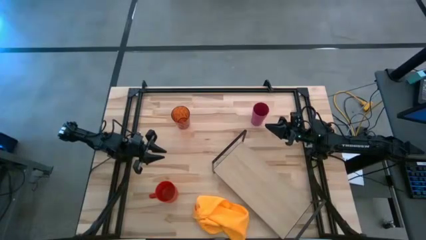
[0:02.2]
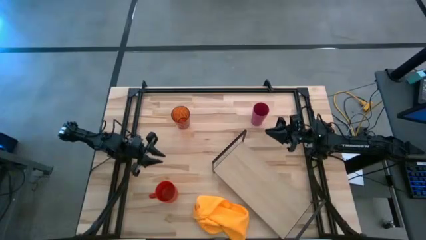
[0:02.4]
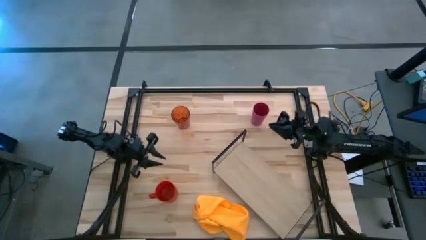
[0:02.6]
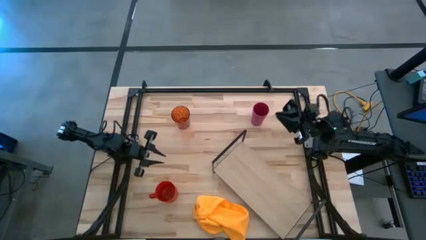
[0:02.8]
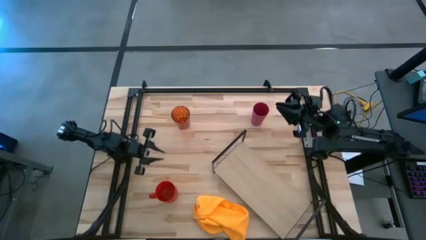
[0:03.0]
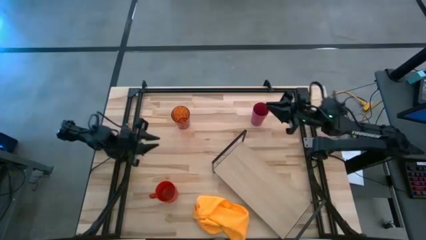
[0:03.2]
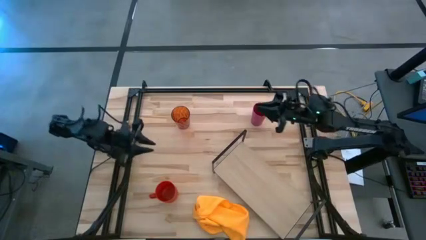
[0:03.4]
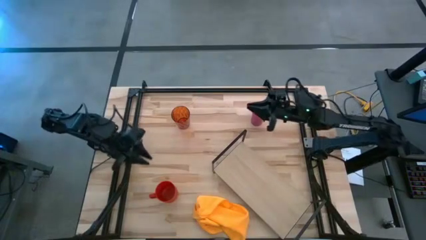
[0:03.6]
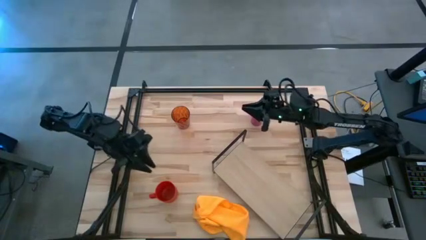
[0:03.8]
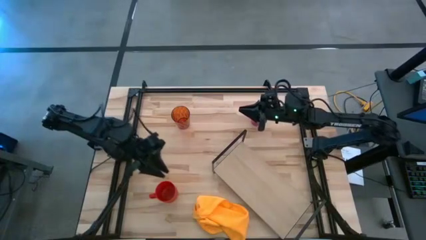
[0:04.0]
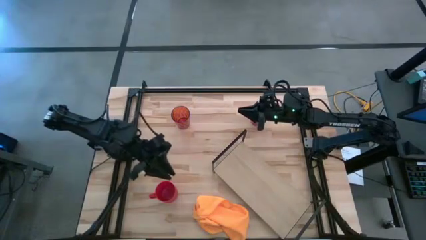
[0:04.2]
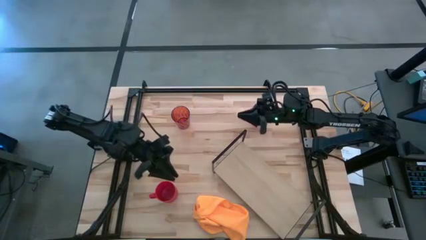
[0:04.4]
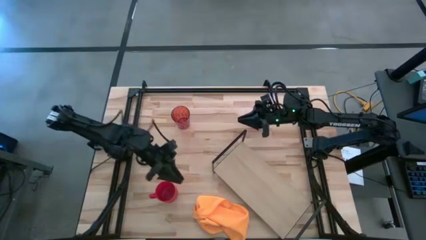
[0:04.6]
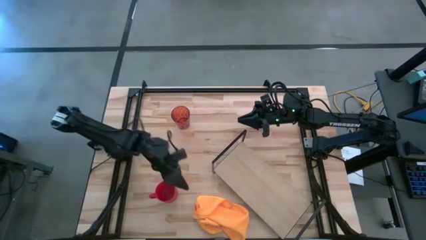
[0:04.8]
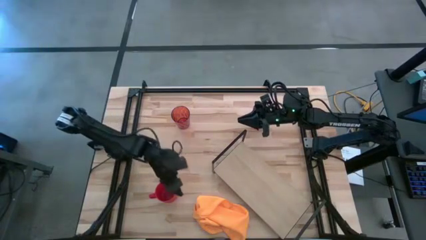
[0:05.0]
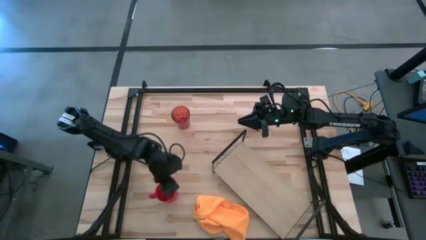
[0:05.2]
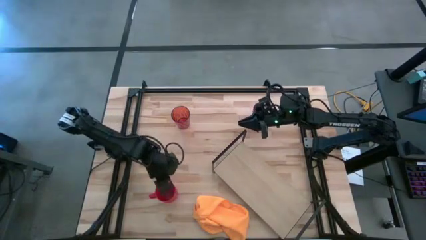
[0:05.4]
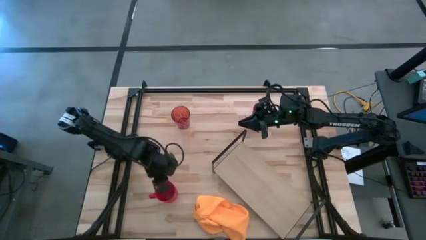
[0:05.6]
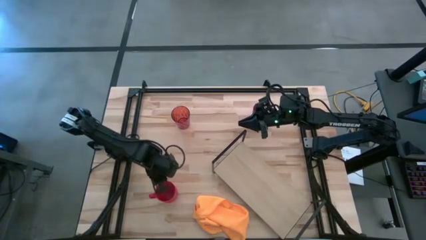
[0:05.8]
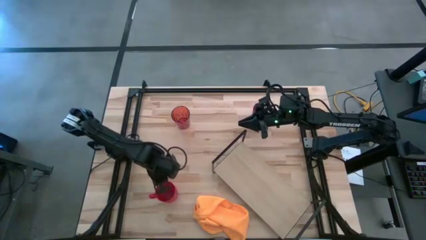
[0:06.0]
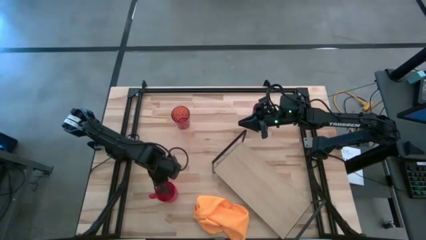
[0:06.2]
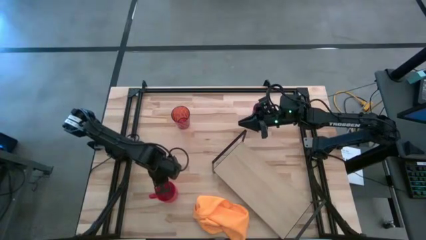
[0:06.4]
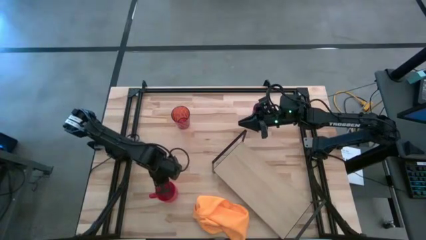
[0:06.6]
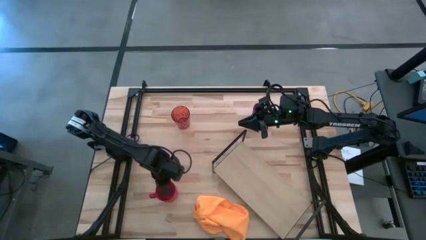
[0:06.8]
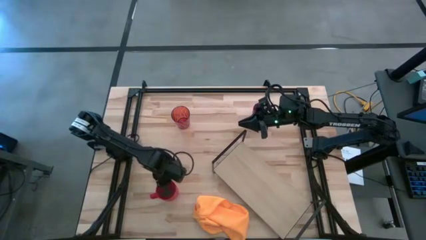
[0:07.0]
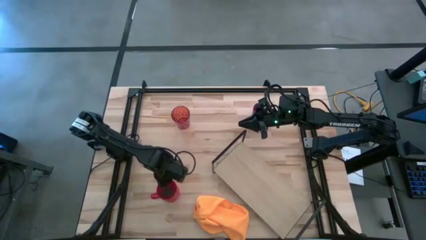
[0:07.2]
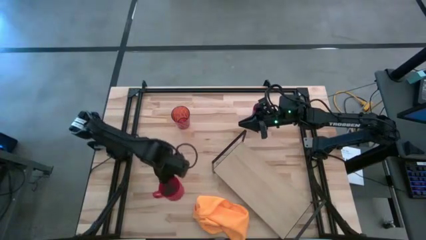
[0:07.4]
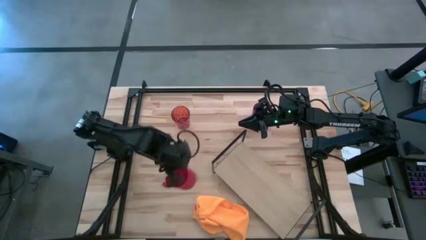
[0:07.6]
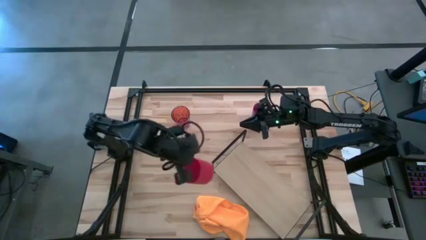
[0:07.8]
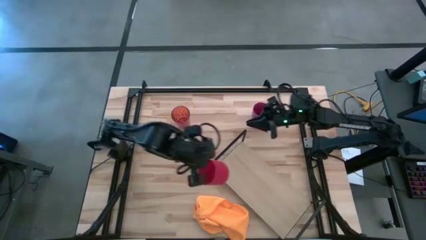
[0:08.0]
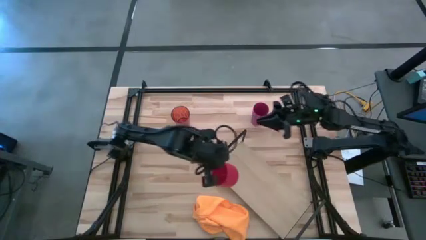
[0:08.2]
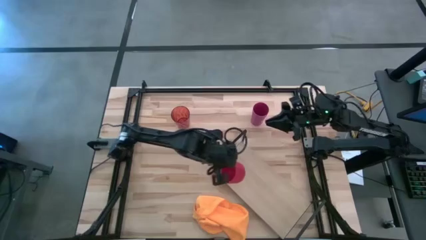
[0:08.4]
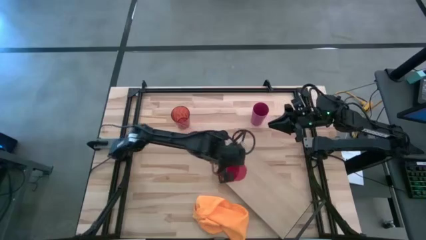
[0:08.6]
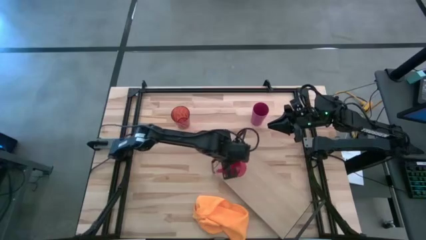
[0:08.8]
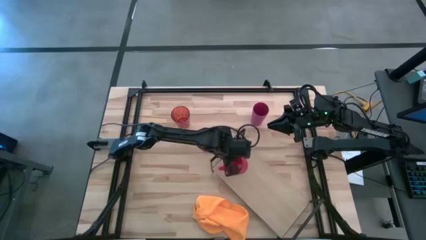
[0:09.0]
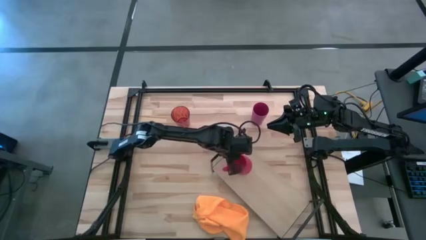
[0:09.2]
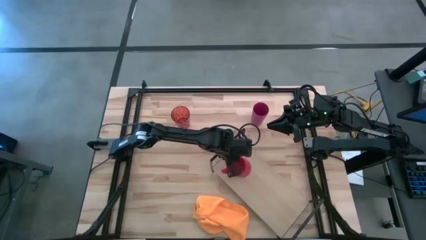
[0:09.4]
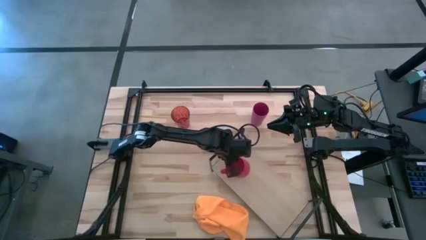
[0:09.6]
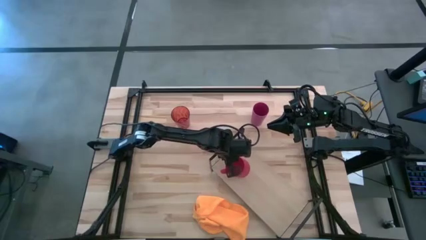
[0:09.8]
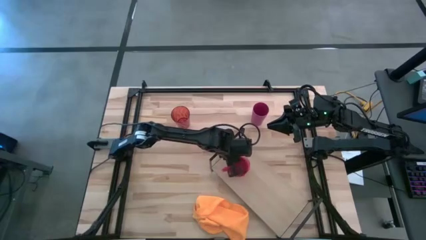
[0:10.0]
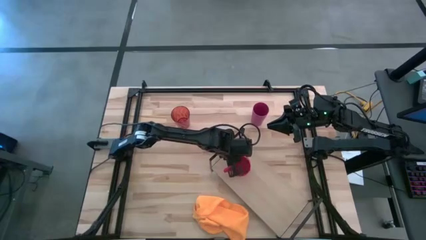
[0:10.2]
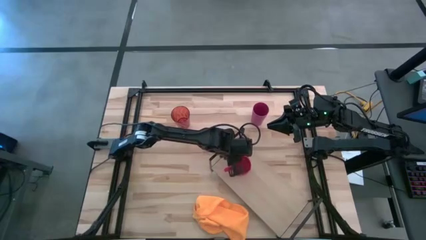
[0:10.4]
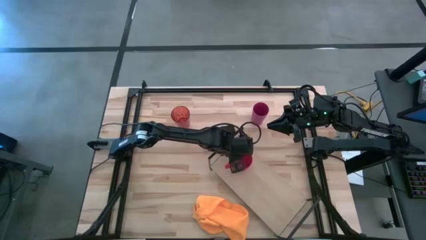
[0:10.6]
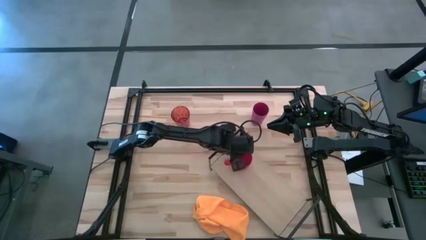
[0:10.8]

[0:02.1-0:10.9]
Task: Stack small to large cups/mugs on shelf
Put the orange mug on the shelf

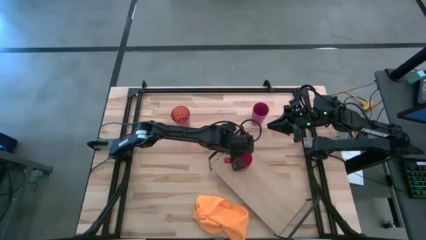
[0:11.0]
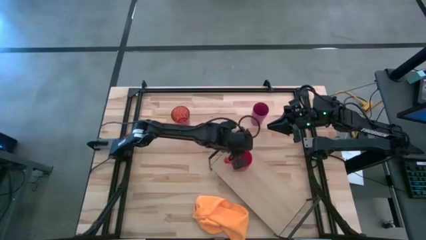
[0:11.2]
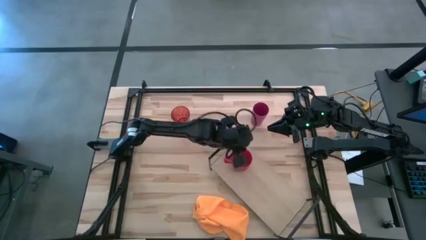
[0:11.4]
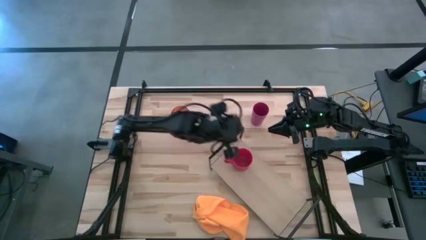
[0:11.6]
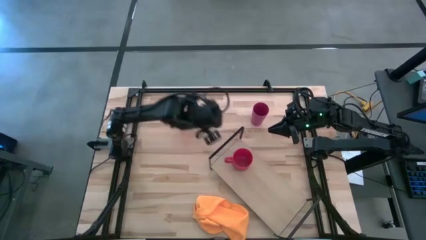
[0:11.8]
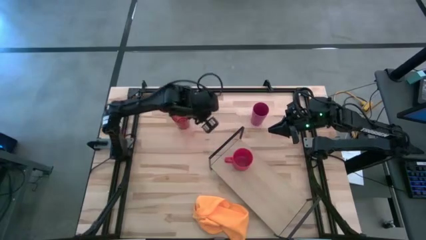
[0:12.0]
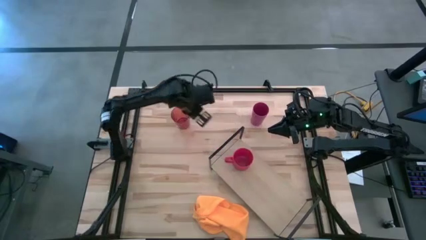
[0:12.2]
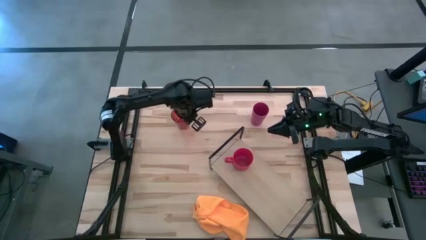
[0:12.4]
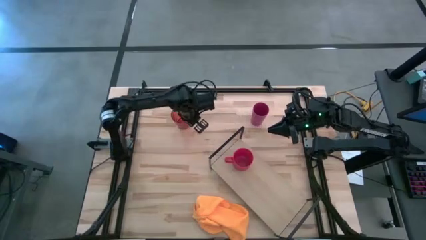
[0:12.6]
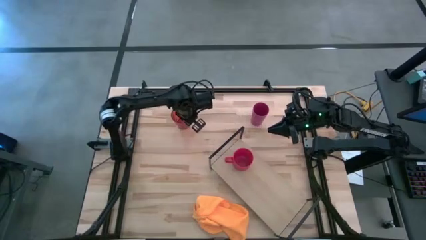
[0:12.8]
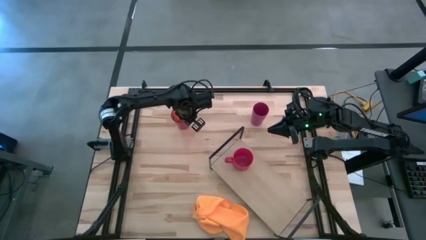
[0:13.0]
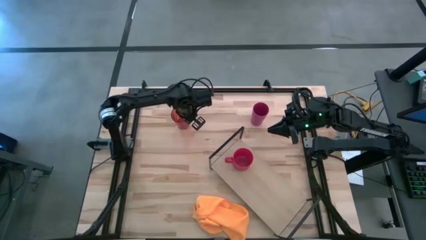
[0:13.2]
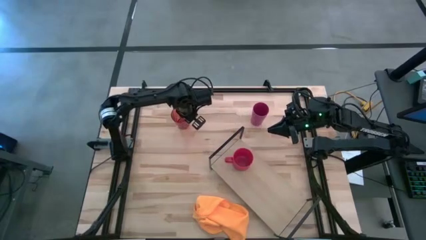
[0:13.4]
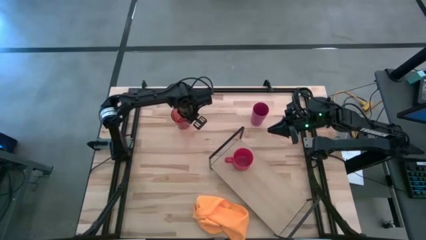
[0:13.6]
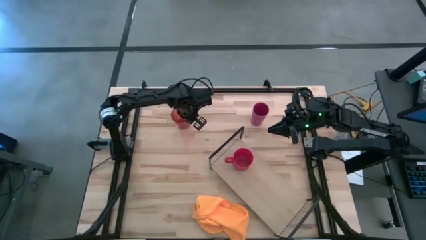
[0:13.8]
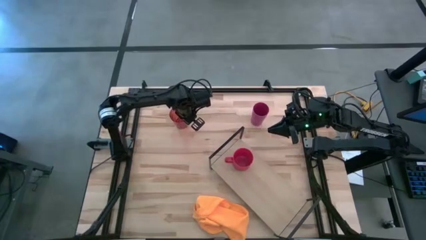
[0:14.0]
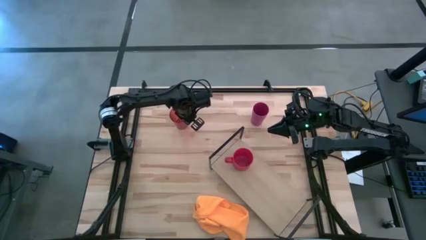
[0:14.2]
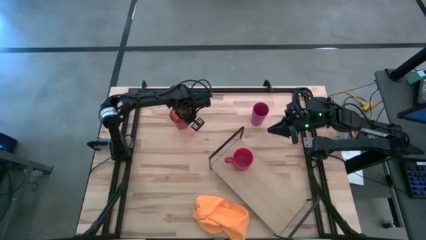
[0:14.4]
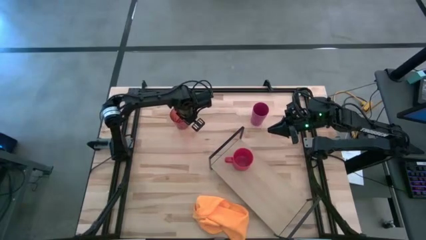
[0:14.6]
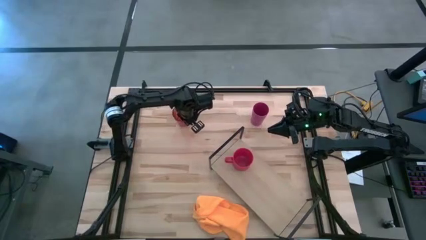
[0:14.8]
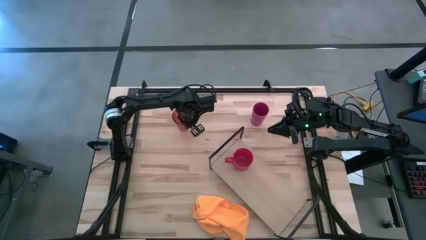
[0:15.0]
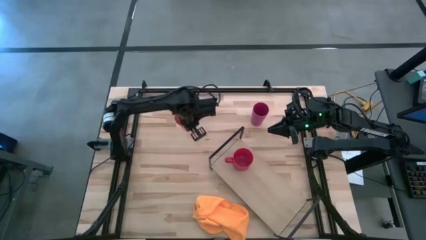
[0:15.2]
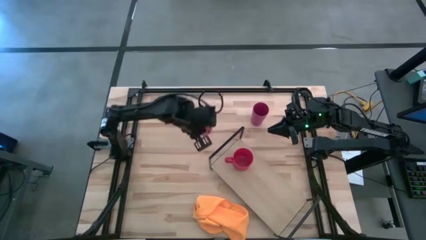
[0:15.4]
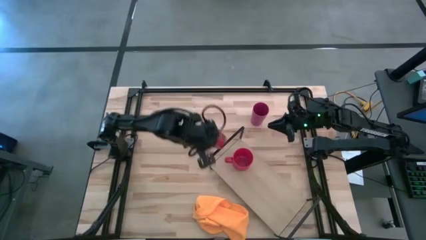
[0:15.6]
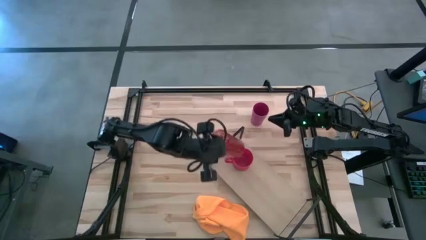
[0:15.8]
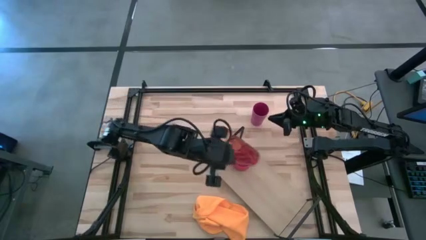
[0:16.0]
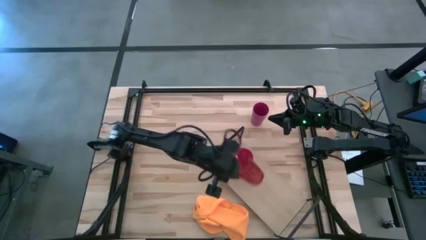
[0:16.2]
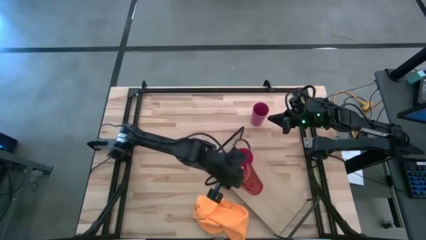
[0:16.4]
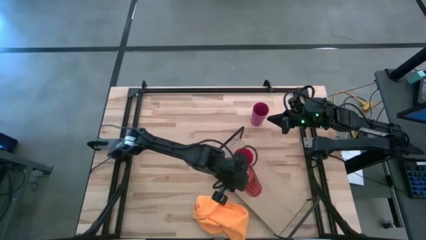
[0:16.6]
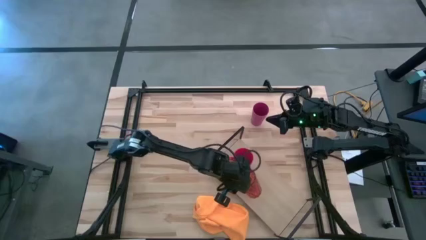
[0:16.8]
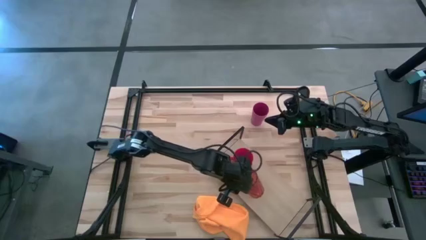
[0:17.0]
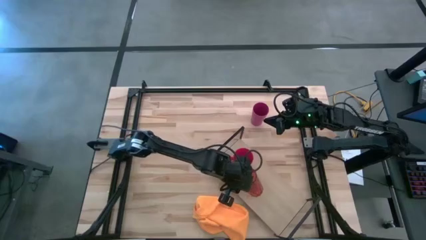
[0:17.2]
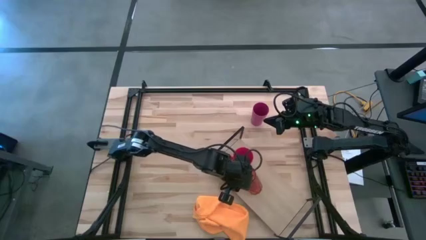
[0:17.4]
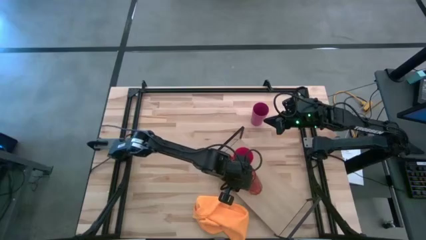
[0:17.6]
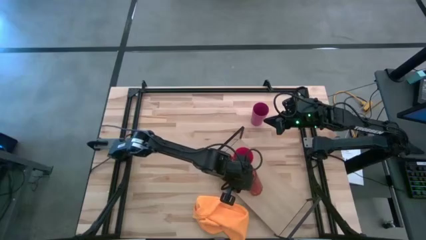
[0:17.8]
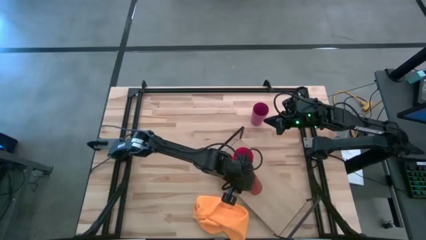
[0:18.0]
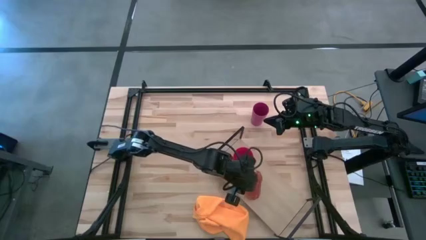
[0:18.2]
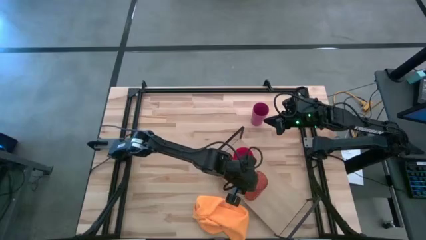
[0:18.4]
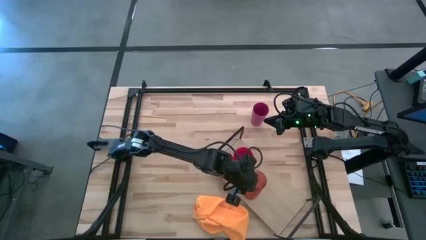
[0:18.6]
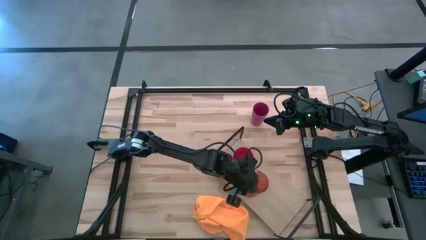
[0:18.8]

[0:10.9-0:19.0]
Put the orange cup on the shelf
